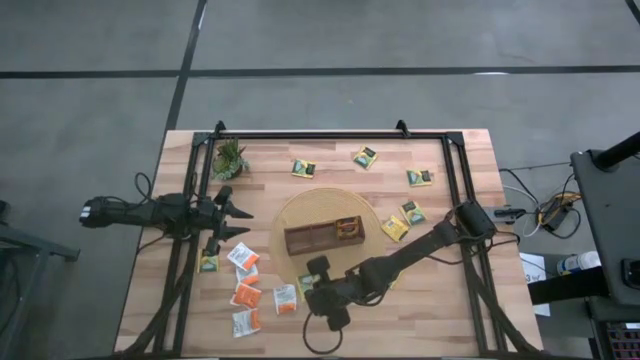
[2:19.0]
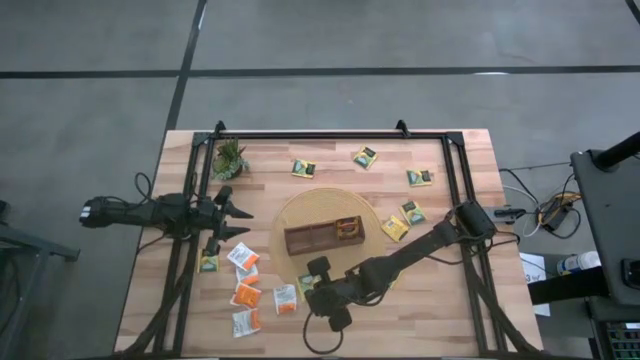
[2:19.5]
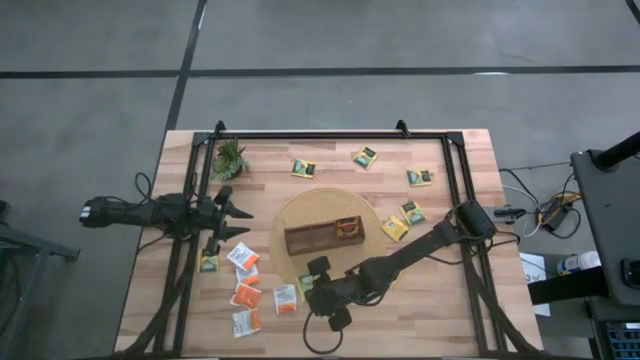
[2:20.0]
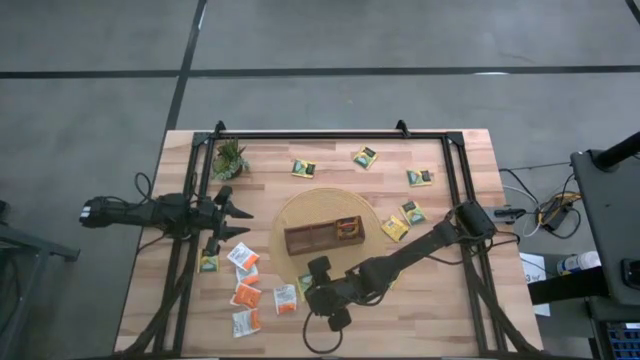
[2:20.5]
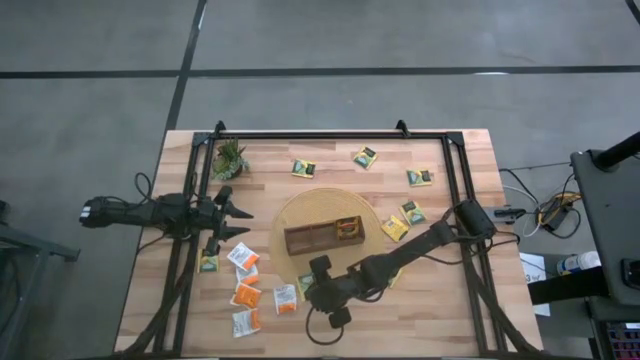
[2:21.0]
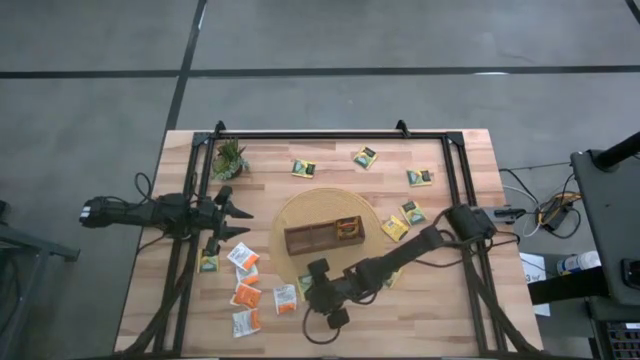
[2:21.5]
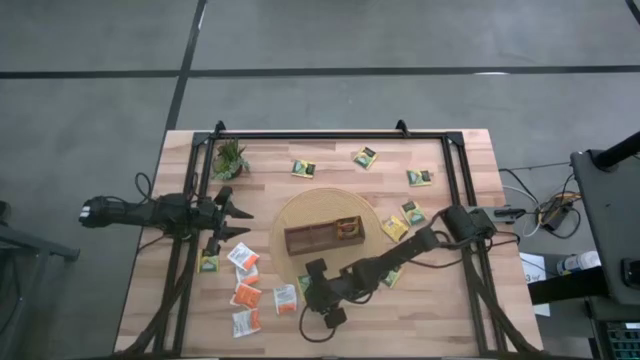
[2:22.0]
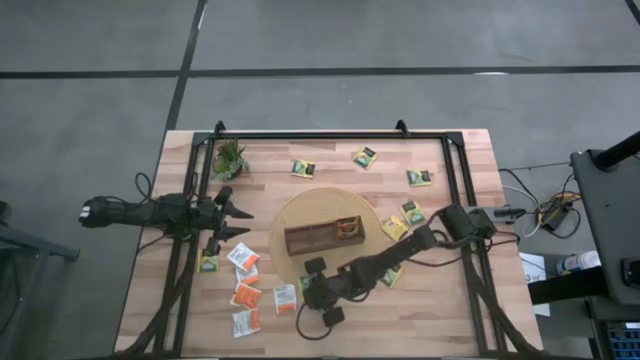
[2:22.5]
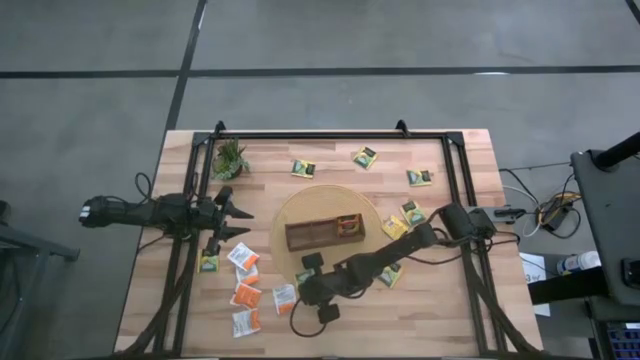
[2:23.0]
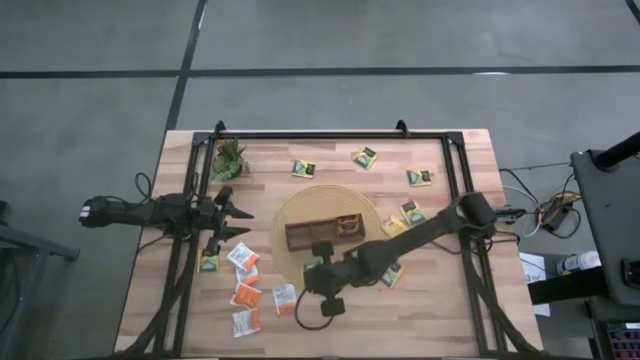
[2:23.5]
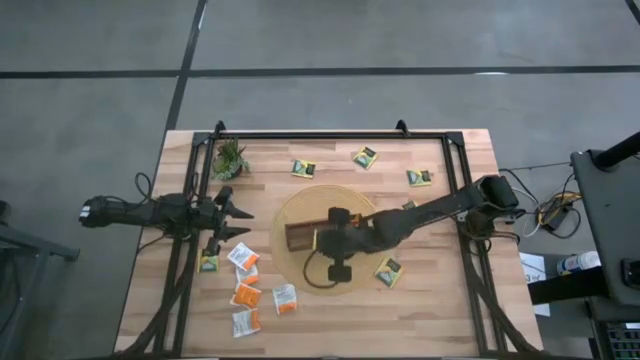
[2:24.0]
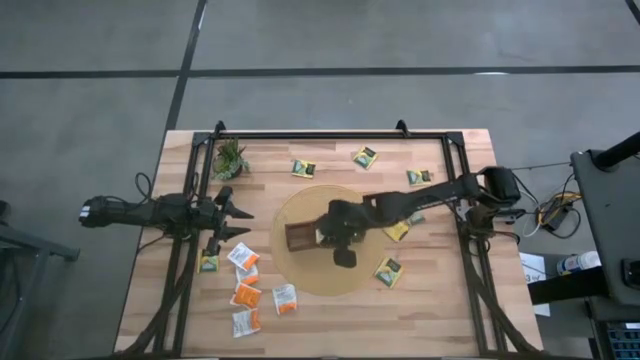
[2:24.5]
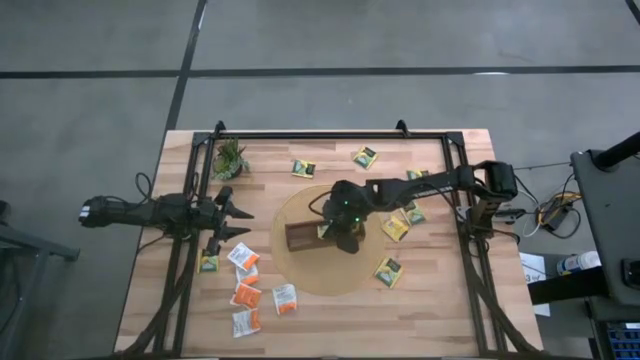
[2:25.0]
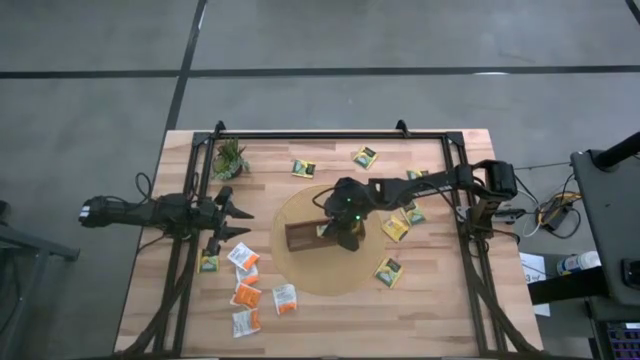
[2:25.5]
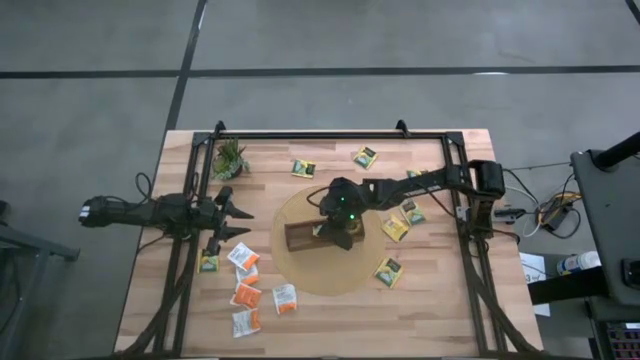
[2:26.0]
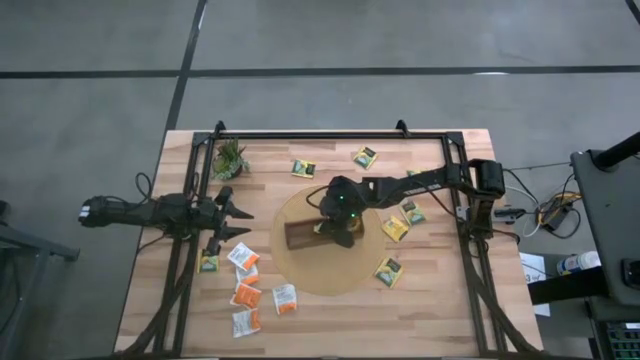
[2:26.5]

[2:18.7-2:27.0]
Task: Pick & Place Tea
Put the yellow tea bag into the middle section of the wooden organizer

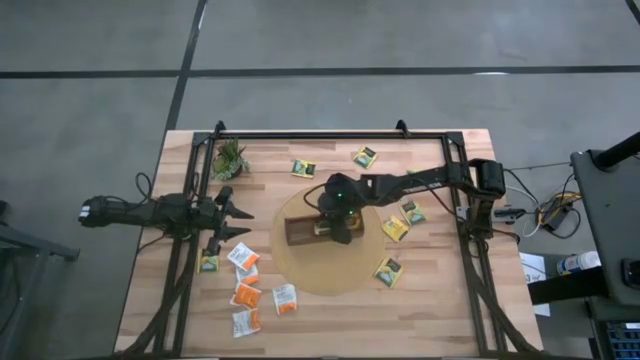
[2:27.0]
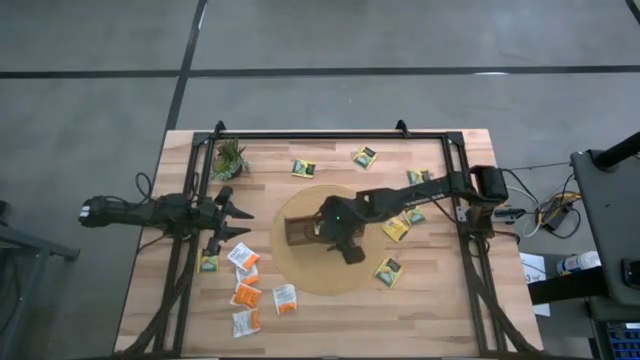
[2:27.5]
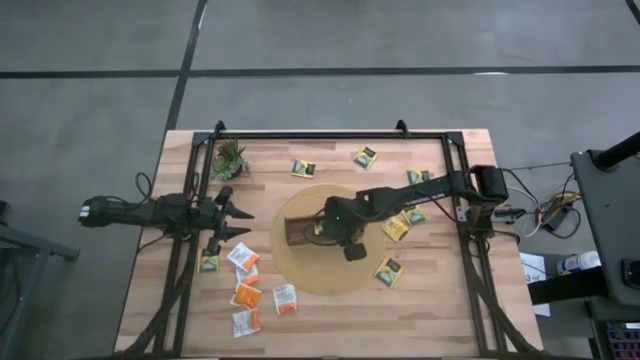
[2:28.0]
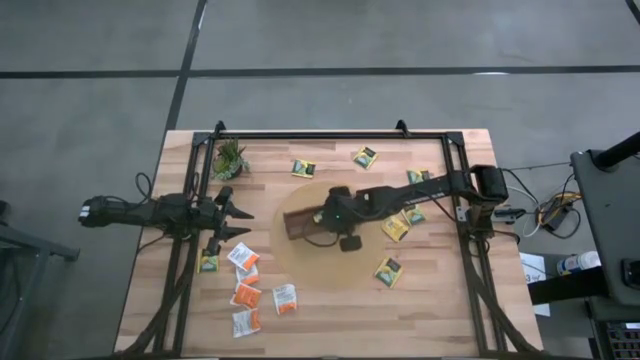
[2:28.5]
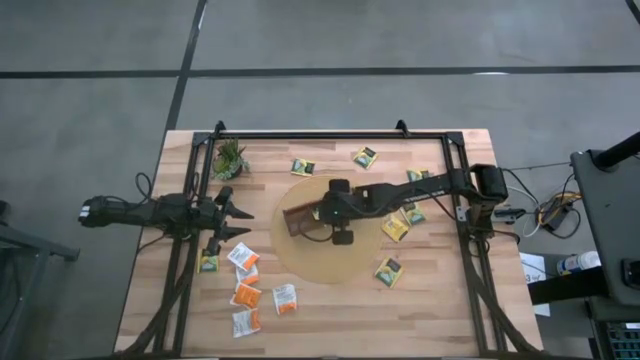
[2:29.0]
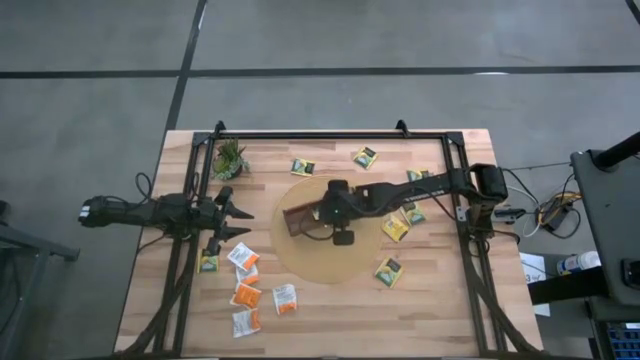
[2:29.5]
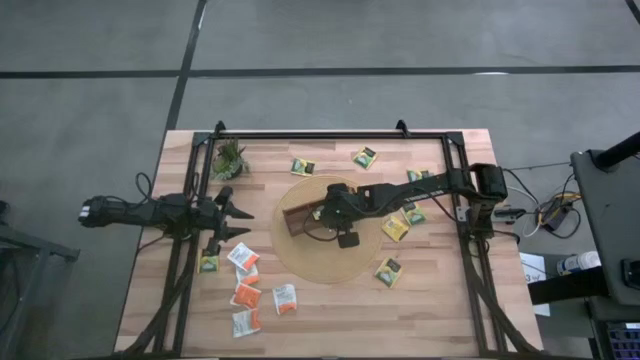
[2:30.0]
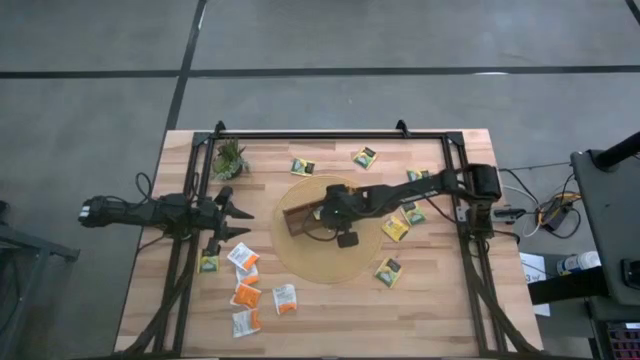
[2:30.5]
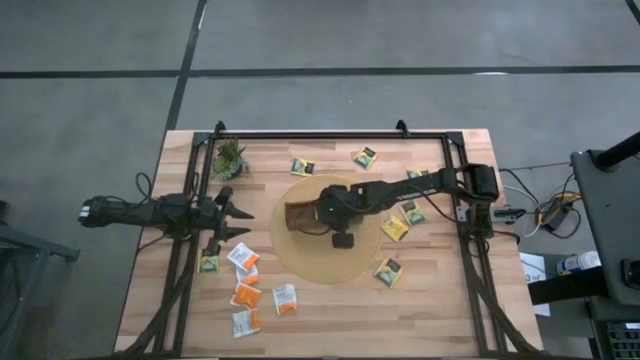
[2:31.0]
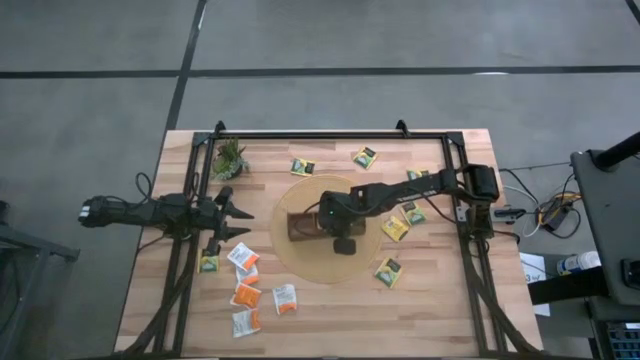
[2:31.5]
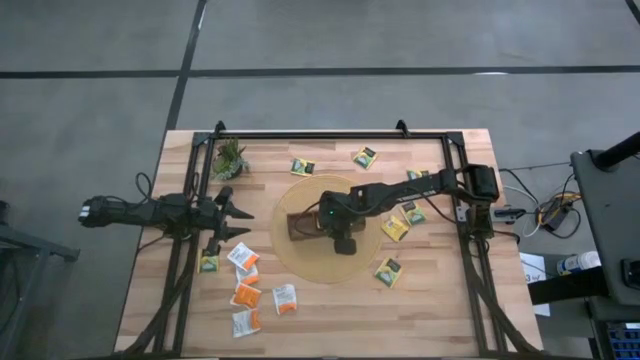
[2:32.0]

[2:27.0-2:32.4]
Adjust the wooden organizer

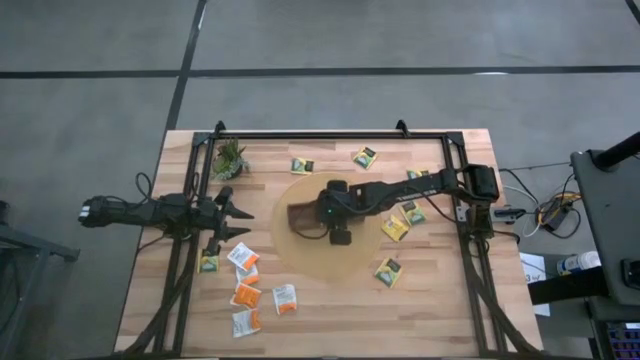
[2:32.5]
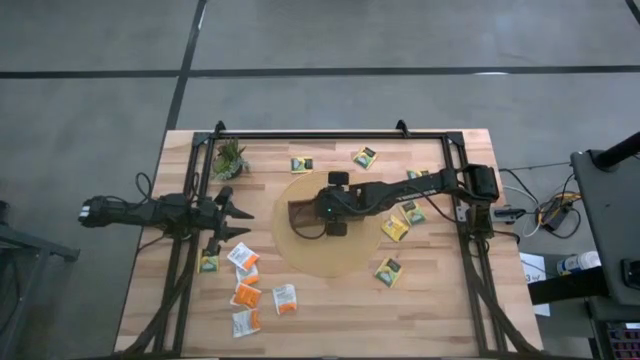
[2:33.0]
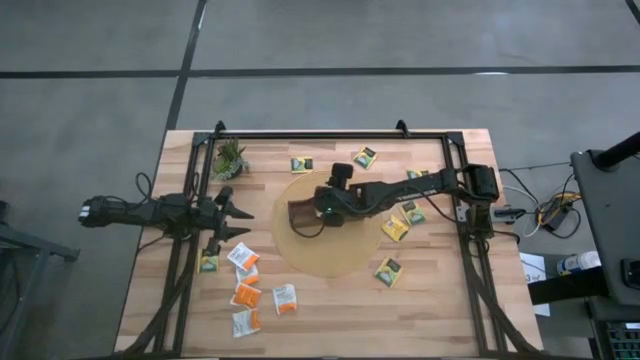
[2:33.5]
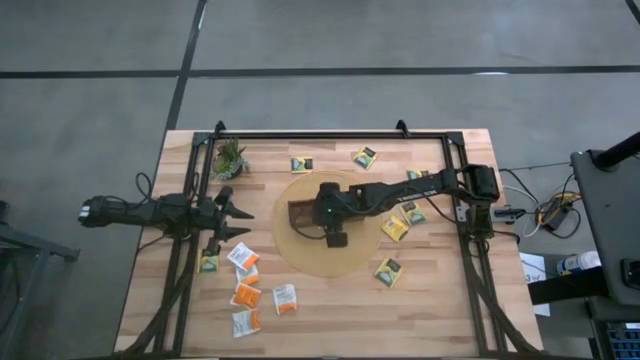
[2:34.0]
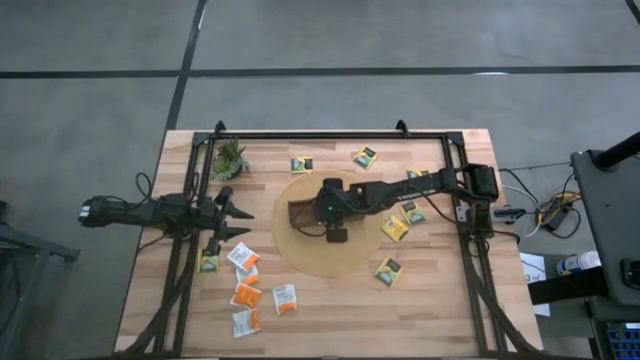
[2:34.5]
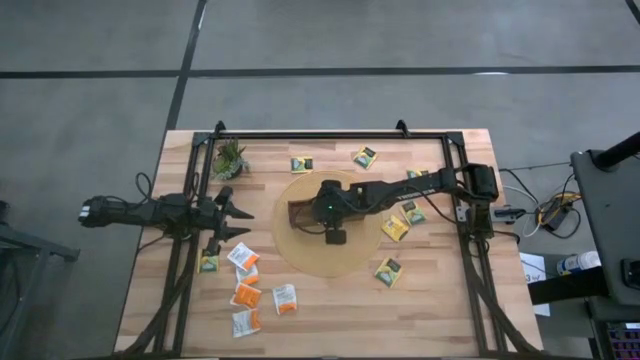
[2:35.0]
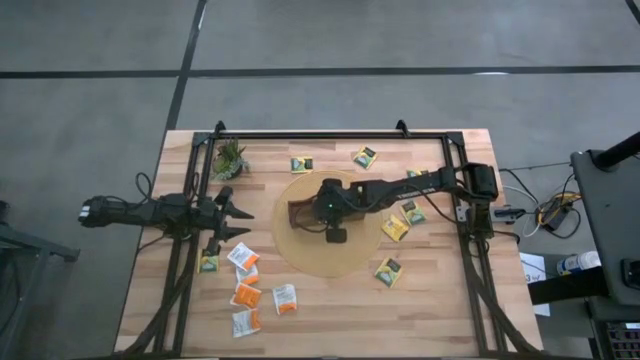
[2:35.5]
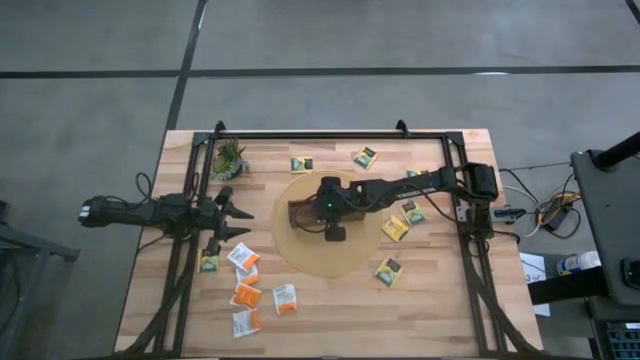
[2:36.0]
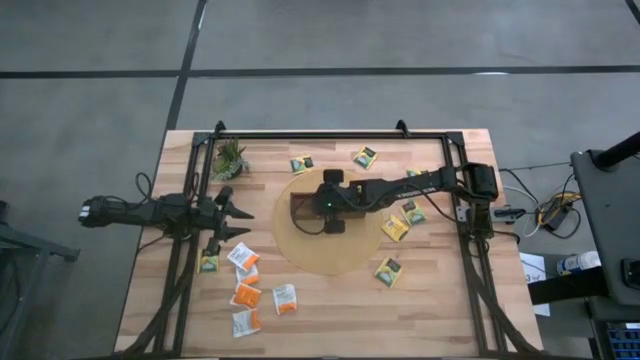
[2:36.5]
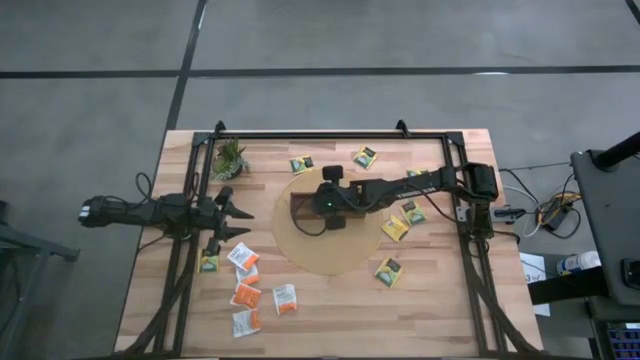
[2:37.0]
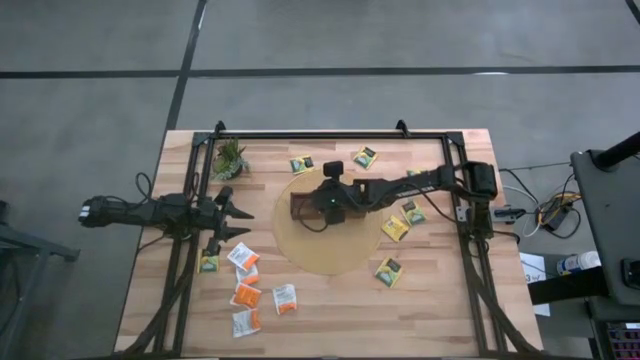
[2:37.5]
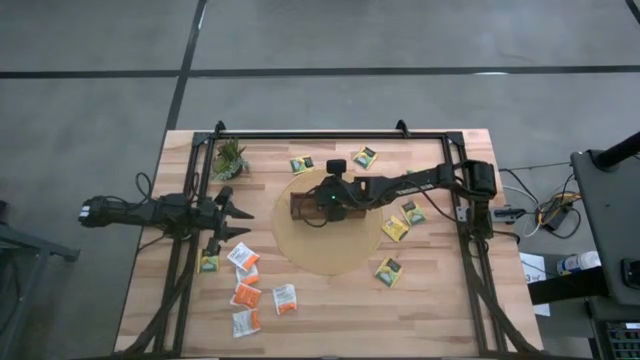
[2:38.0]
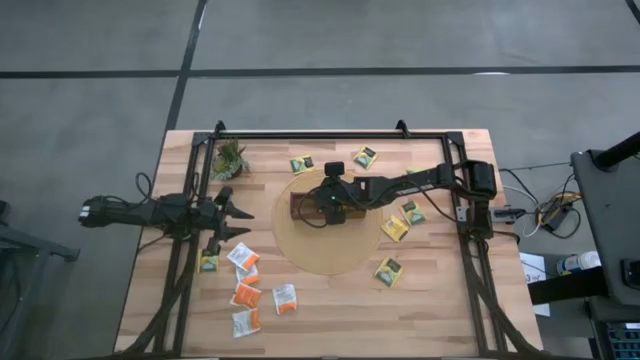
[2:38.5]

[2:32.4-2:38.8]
Adjust the yellow tea bag in the wooden organizer

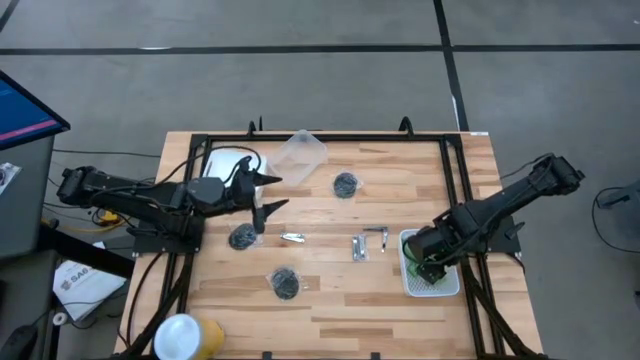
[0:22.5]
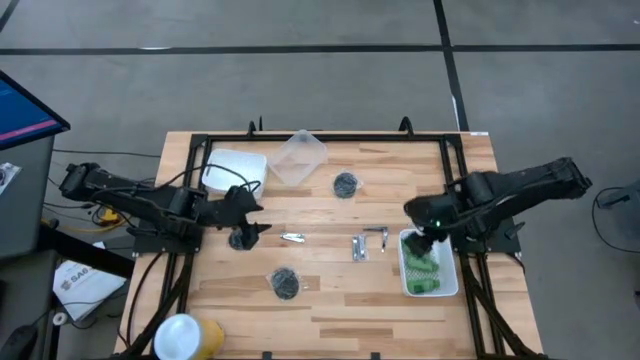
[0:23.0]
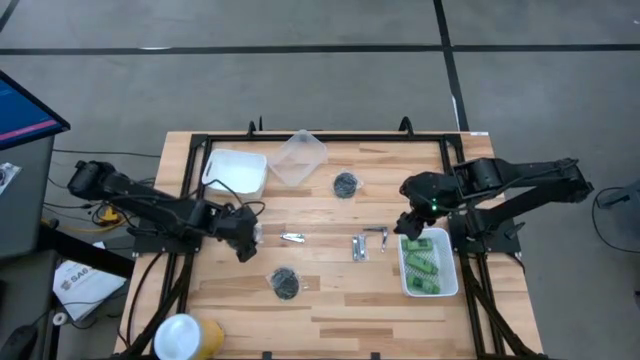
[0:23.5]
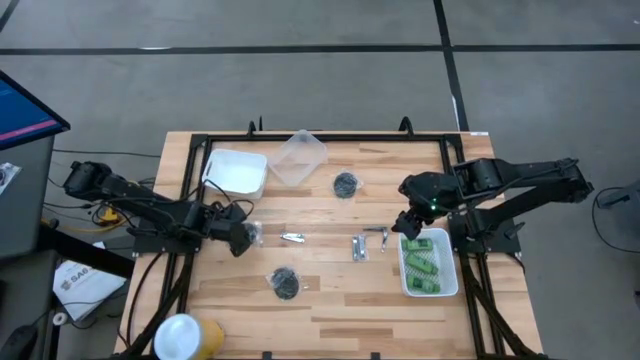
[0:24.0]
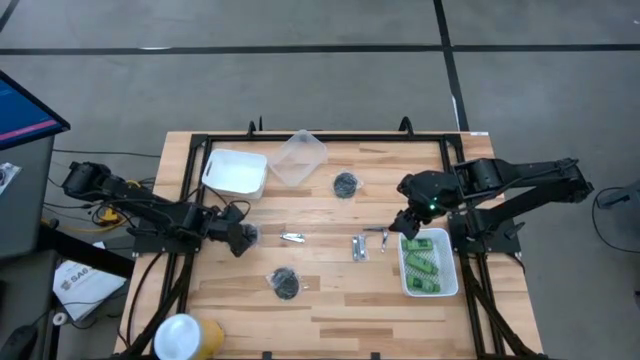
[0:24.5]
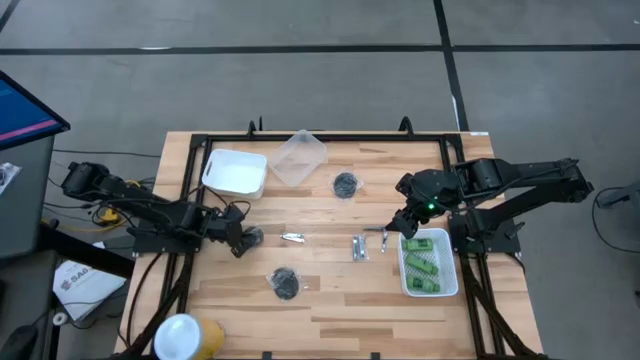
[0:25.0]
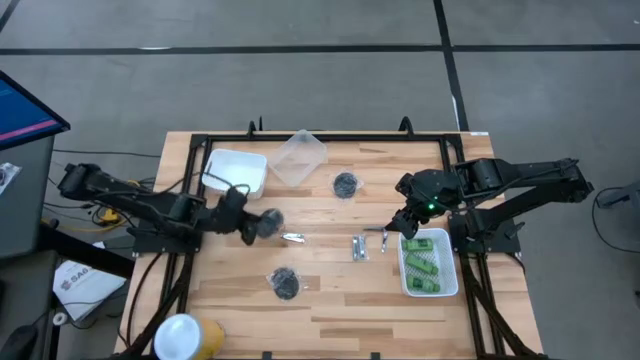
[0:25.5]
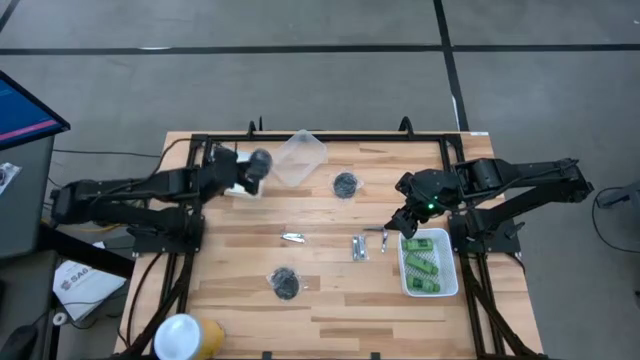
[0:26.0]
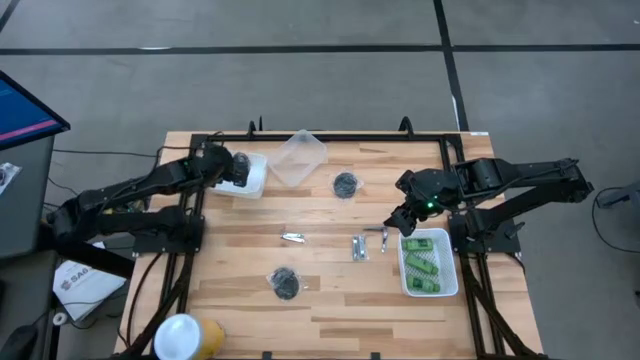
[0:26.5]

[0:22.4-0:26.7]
Task: Pick & Place Travel size toiletries
Put the black hairbrush into the top white bin
